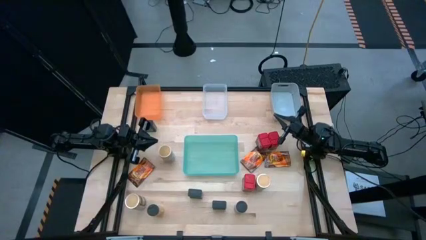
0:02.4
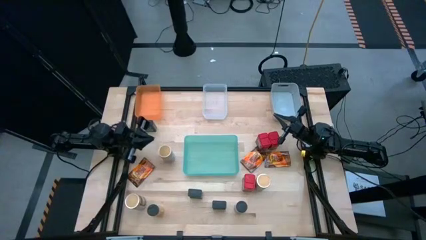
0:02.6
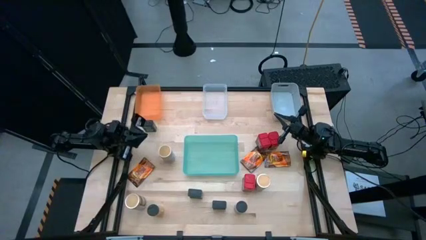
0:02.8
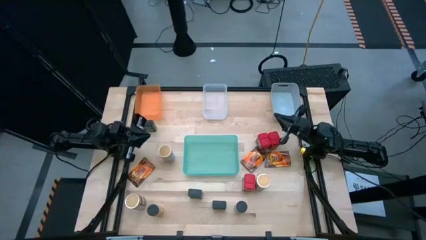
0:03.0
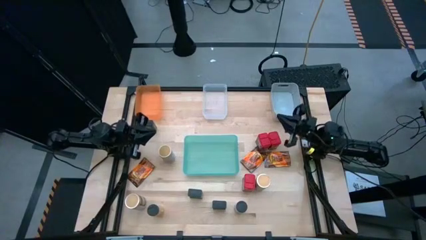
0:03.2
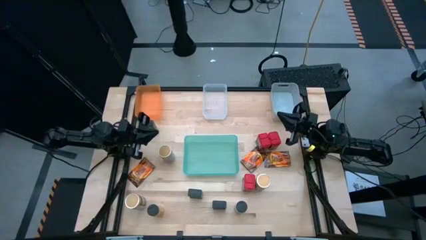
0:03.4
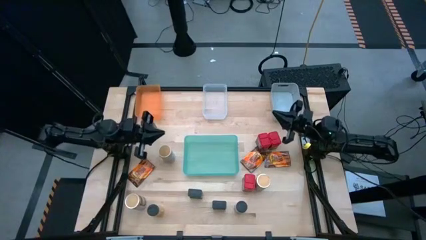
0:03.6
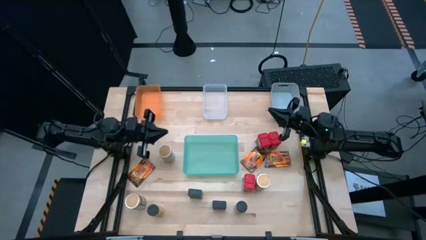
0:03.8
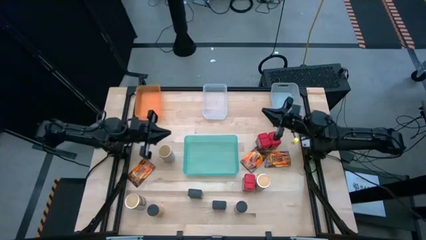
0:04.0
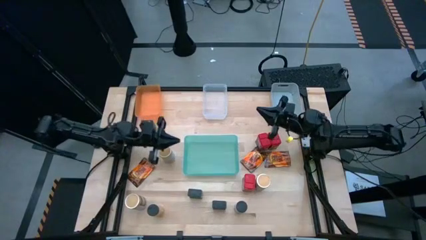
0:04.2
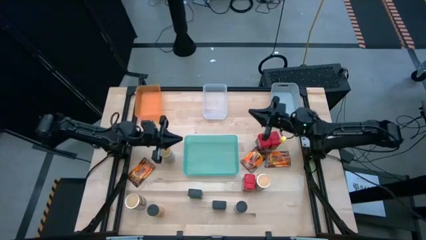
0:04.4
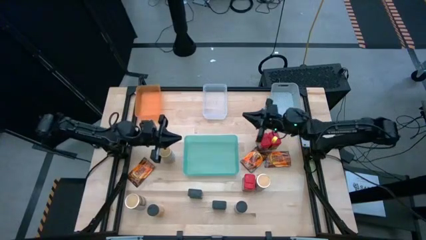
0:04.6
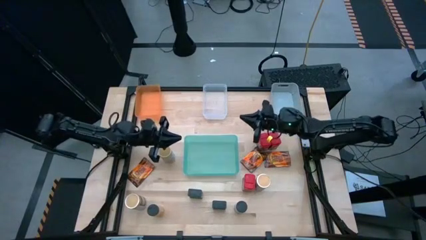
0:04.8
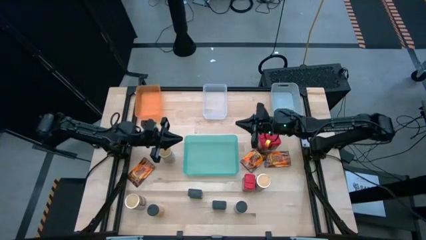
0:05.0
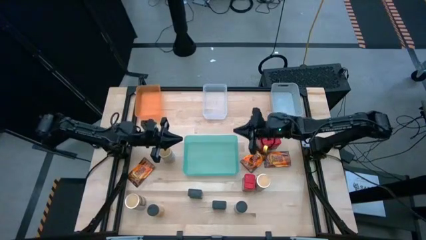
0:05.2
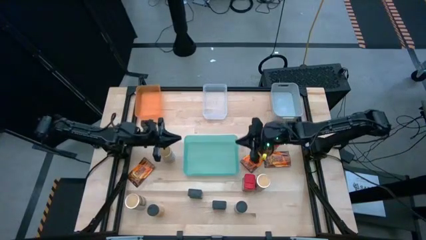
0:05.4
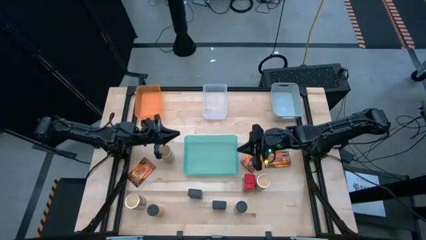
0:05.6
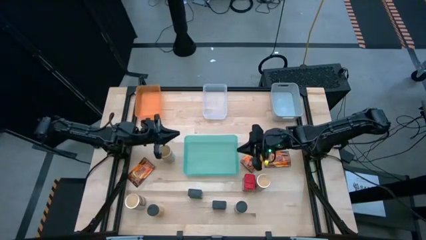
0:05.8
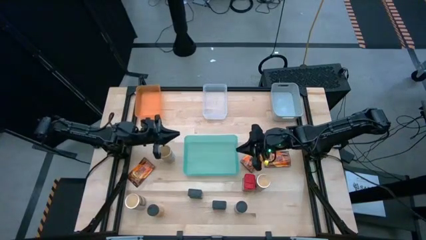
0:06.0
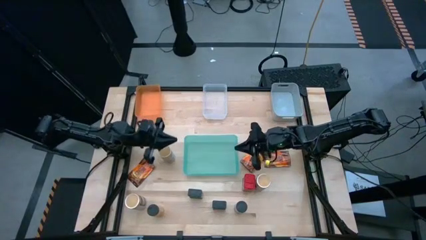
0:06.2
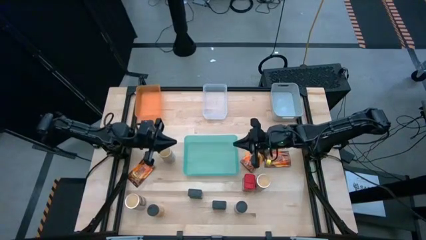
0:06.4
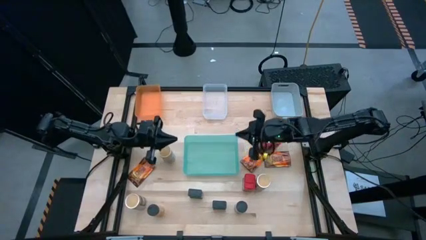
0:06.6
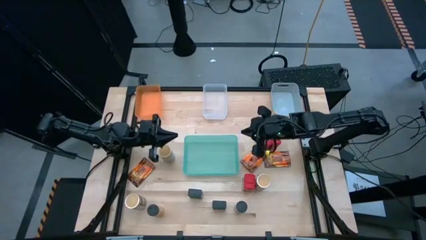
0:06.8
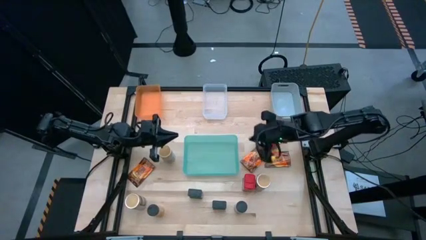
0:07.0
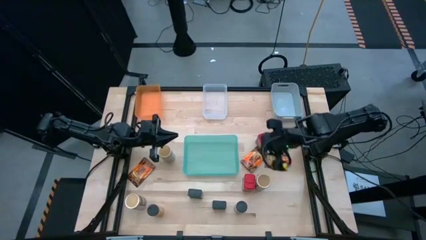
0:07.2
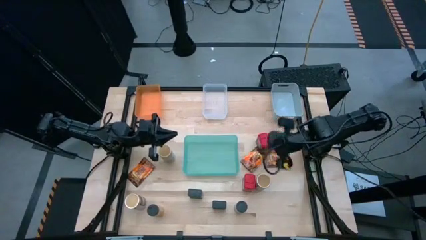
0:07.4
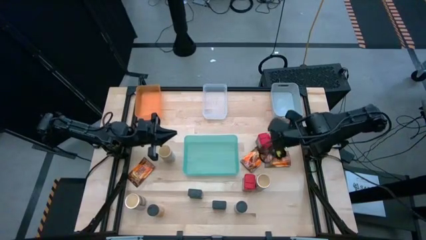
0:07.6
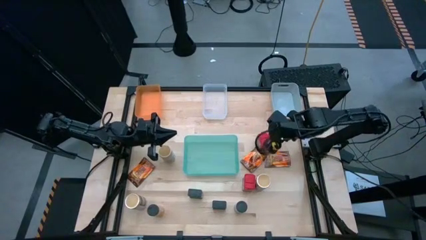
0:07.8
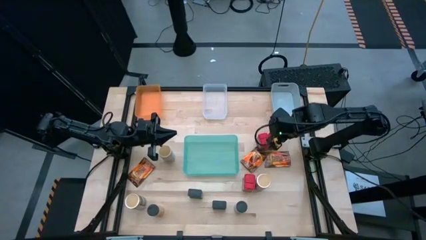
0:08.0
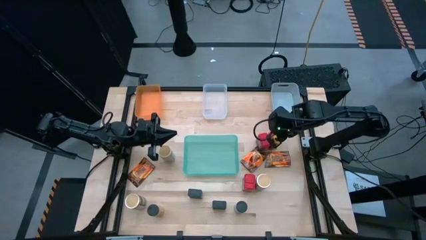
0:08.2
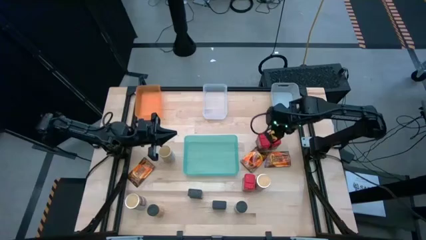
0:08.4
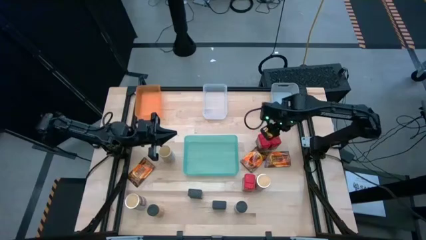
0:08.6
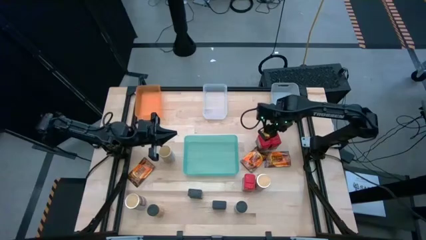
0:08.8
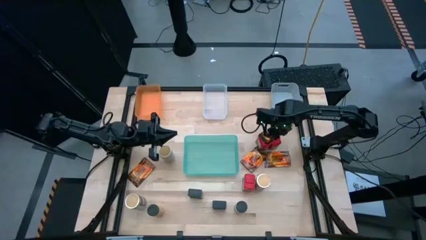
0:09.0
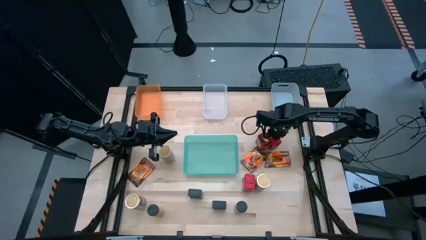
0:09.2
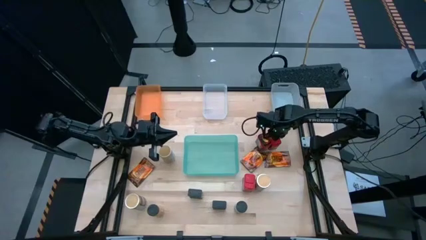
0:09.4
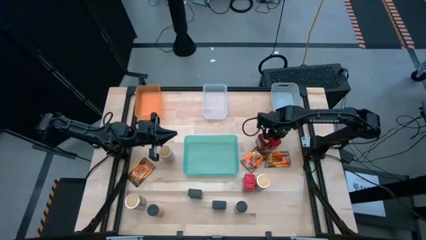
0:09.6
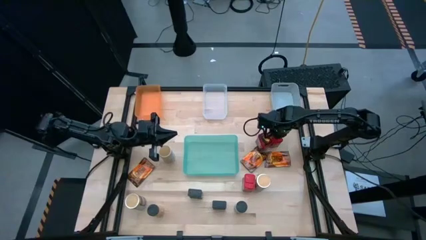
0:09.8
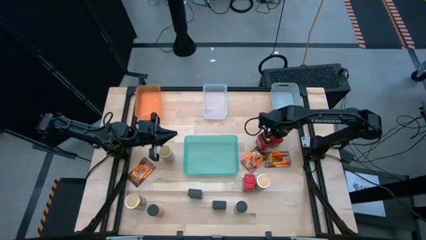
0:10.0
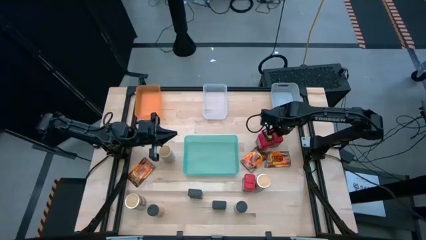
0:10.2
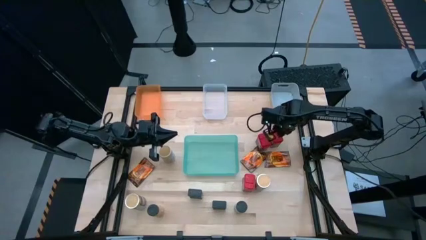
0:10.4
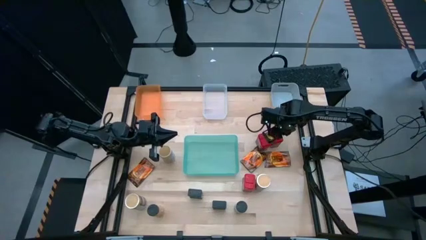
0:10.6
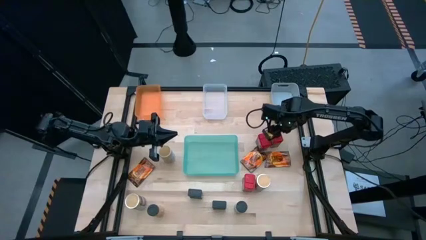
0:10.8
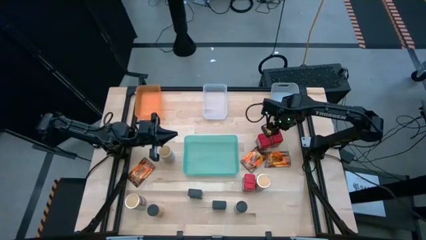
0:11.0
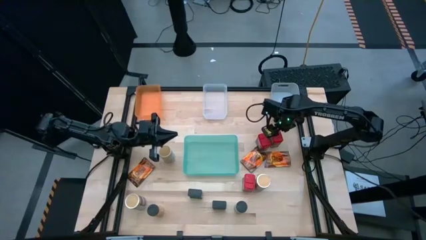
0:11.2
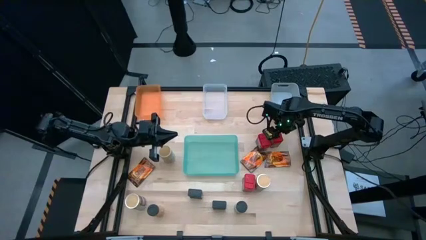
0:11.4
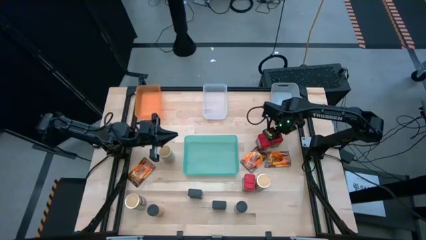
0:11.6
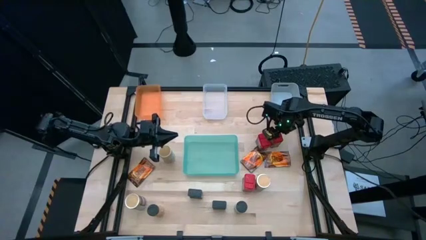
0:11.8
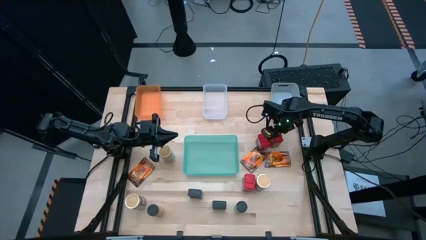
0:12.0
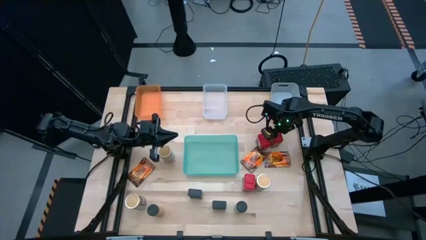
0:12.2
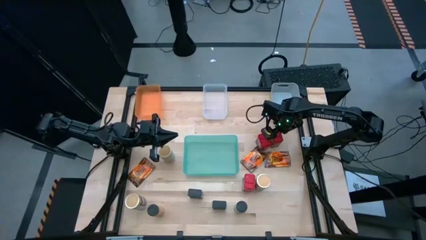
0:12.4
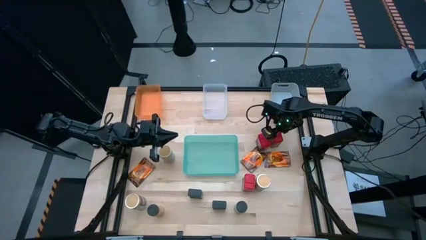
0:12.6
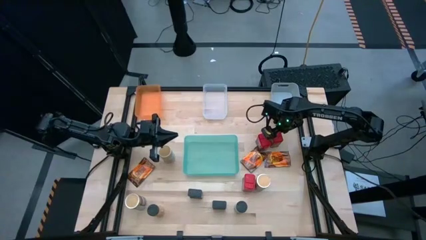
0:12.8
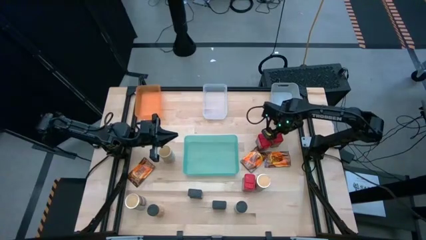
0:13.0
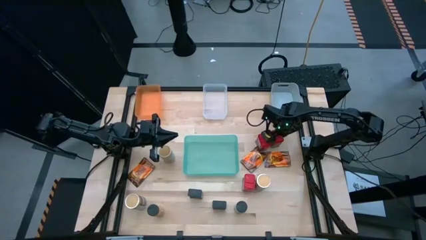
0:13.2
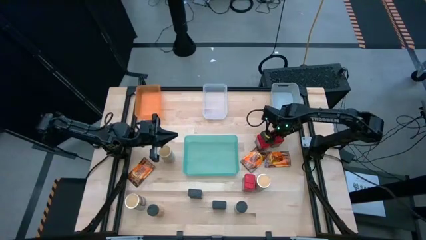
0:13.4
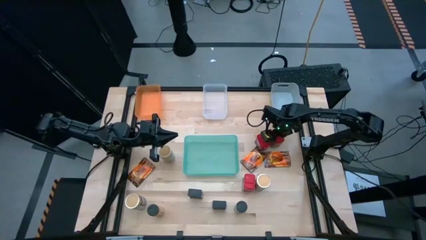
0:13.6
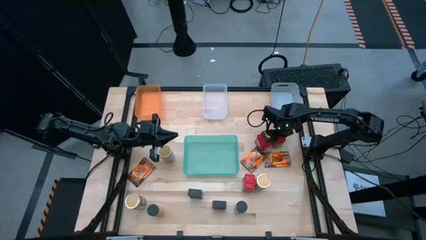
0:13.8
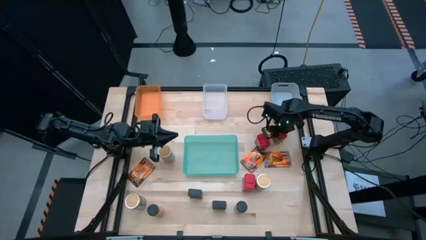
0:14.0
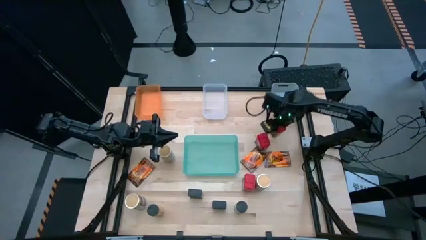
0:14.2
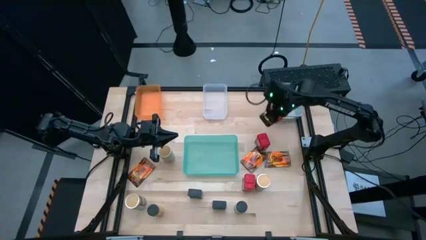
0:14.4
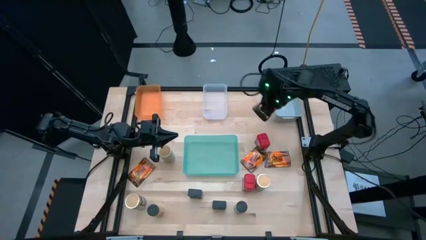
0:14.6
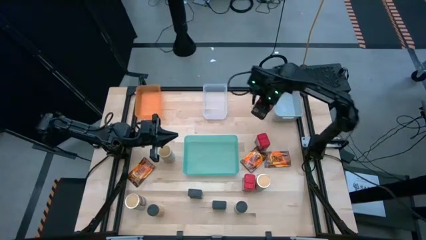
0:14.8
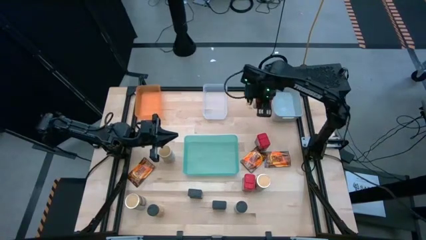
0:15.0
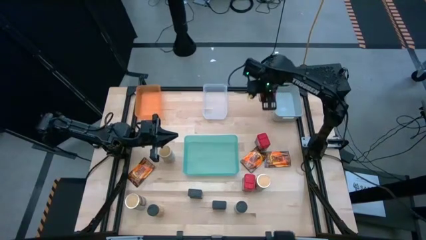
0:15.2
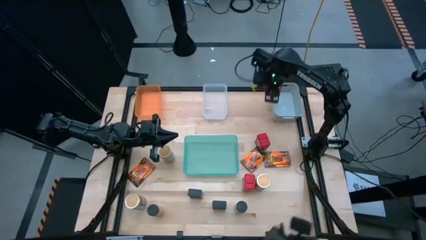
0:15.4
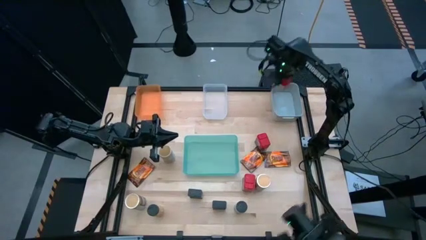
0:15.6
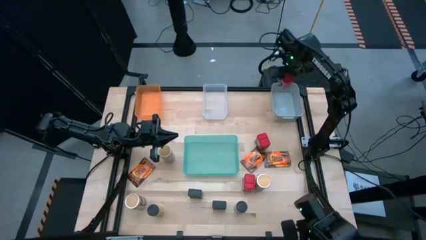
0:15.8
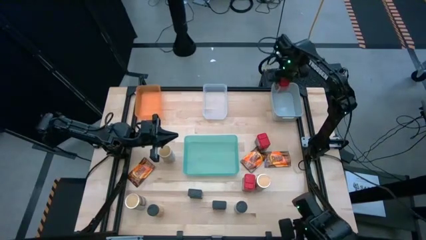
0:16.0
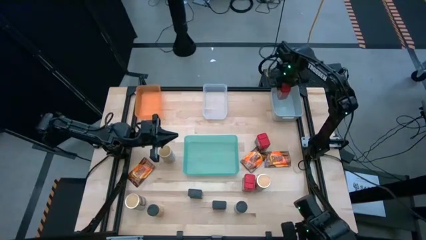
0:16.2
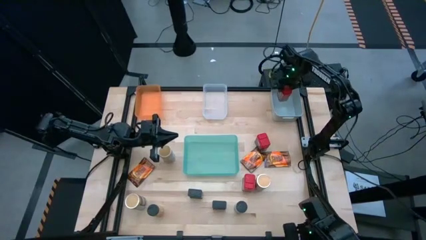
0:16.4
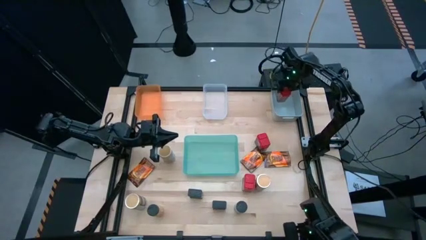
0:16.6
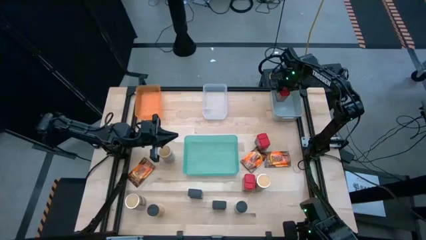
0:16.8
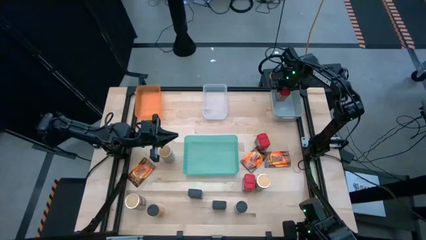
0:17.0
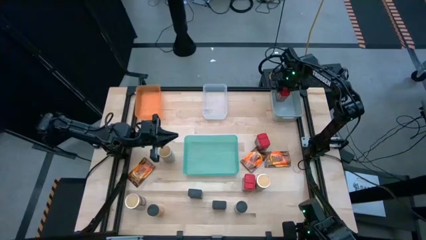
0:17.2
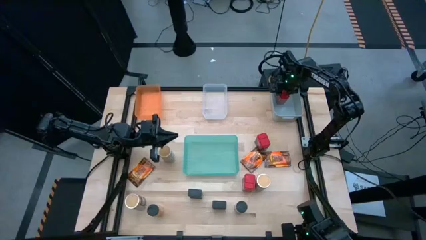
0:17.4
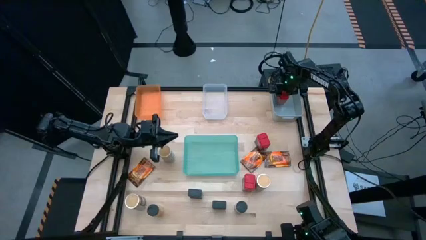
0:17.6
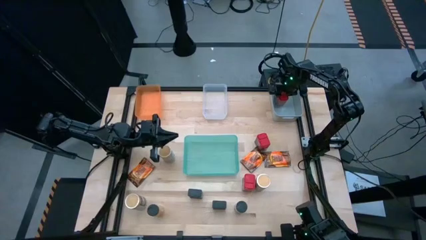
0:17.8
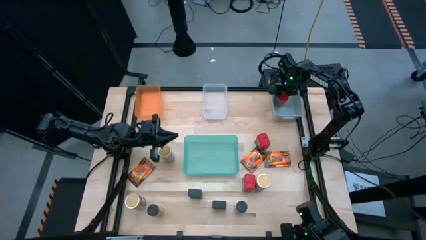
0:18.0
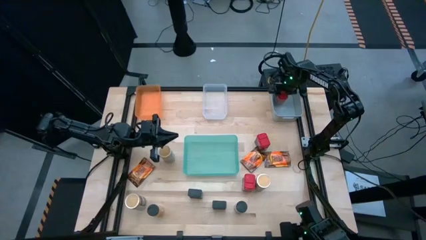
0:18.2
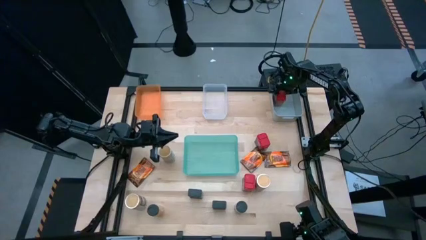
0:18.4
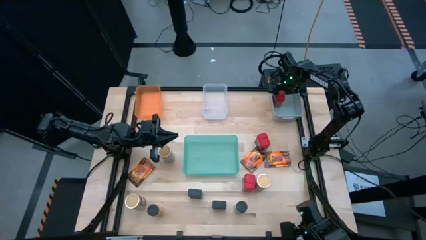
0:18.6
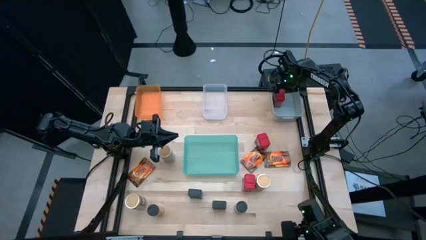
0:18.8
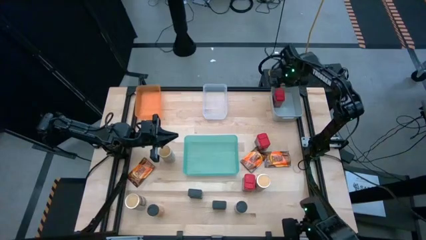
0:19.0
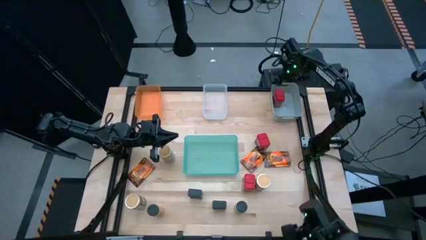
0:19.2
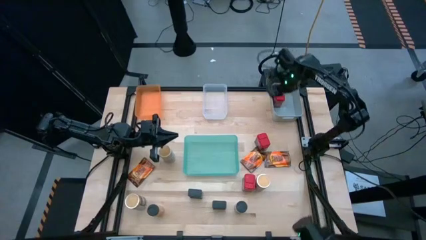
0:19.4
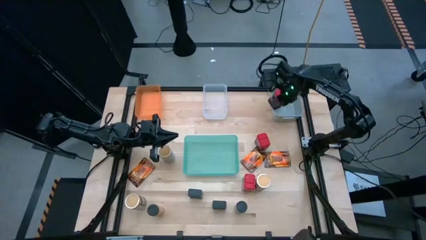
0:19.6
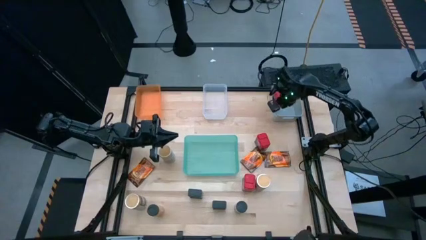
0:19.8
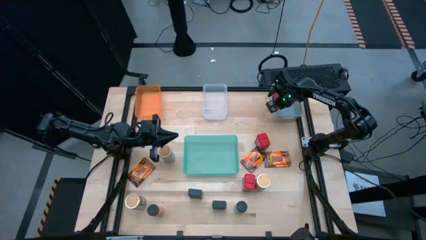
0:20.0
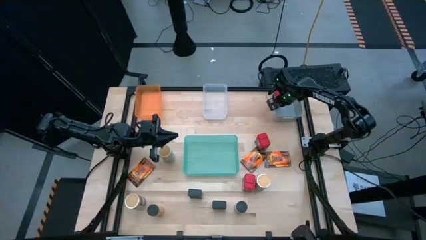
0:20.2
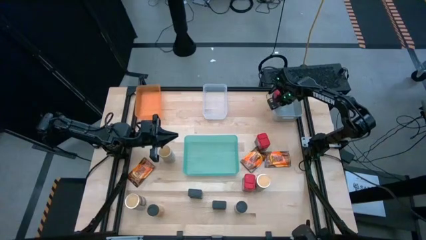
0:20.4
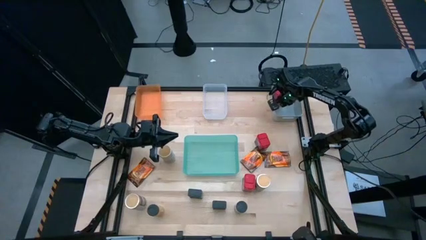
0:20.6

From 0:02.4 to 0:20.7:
Task: Sort spices by type
Put the top right red spice can into the gray bin
